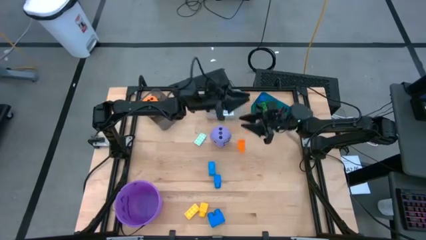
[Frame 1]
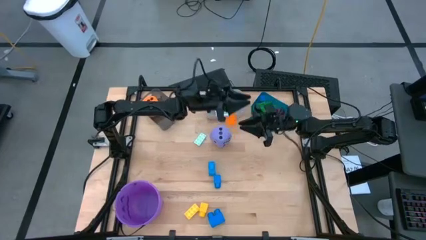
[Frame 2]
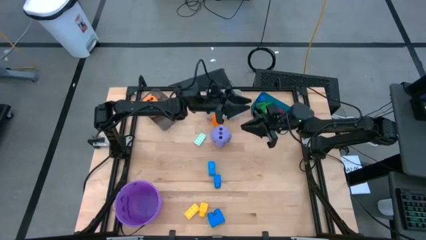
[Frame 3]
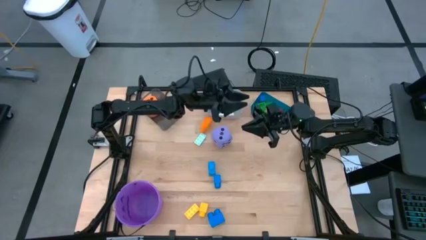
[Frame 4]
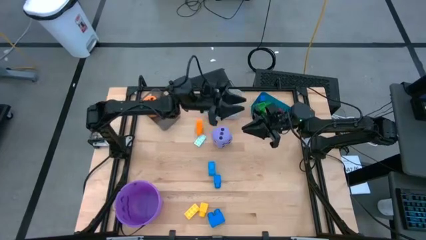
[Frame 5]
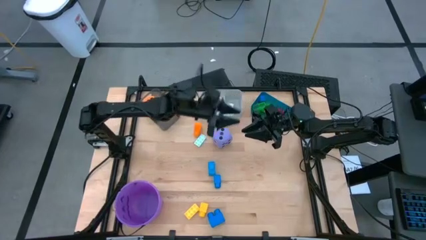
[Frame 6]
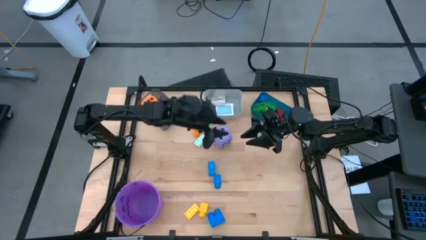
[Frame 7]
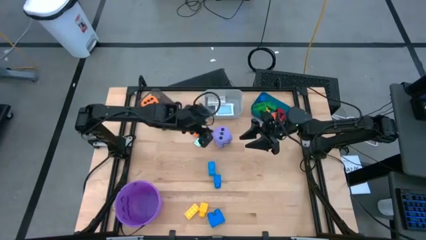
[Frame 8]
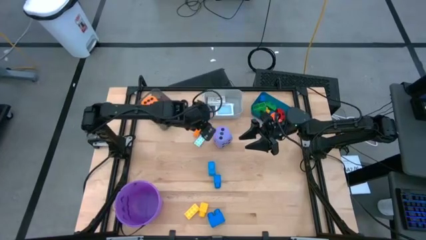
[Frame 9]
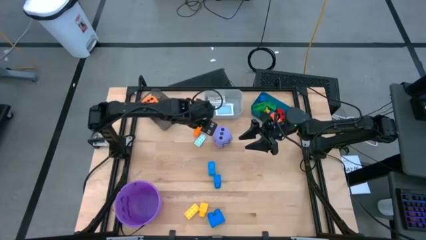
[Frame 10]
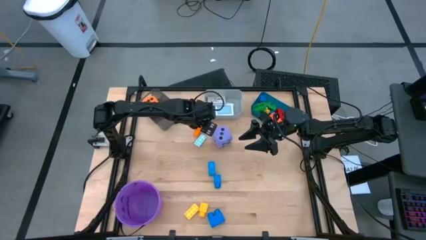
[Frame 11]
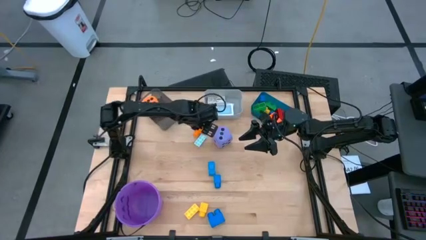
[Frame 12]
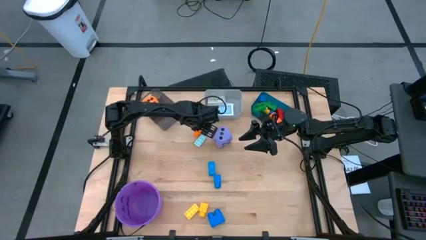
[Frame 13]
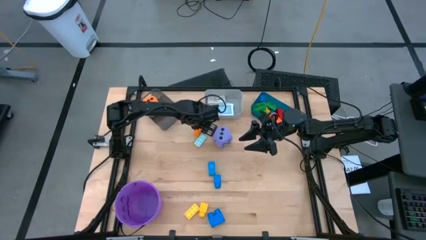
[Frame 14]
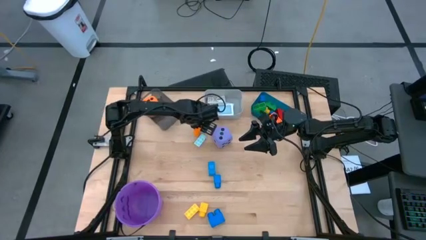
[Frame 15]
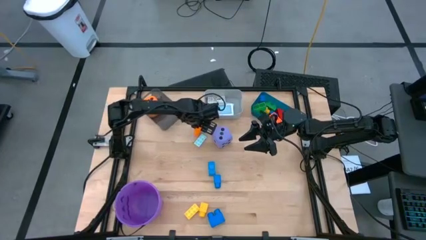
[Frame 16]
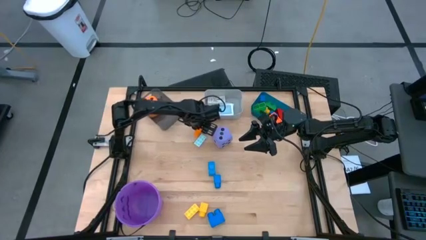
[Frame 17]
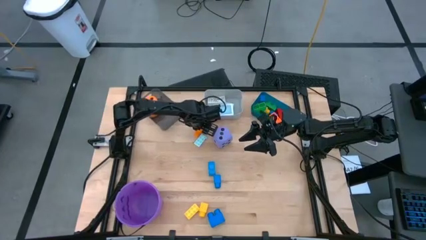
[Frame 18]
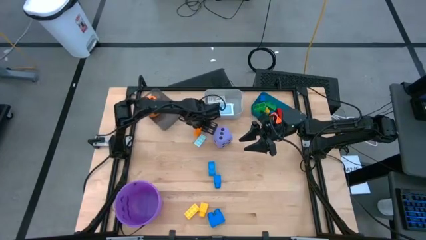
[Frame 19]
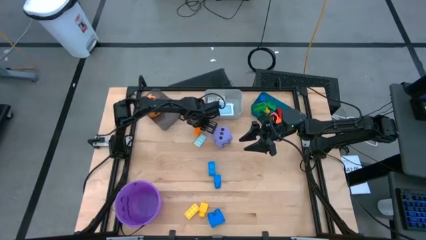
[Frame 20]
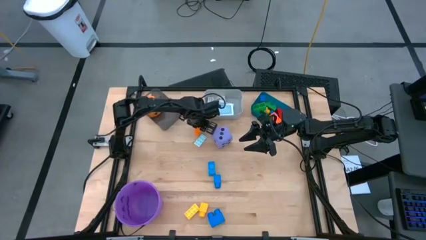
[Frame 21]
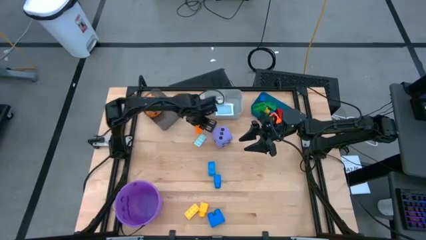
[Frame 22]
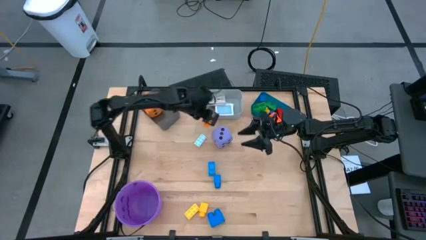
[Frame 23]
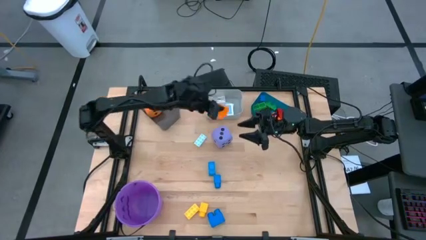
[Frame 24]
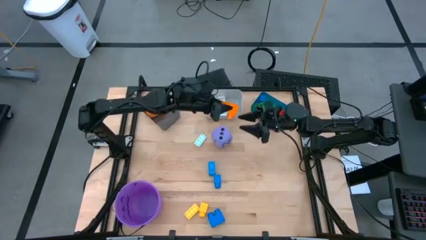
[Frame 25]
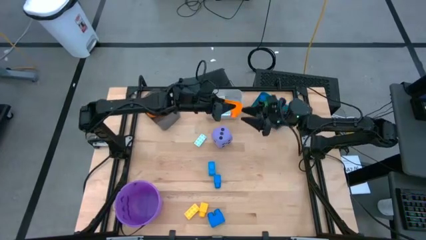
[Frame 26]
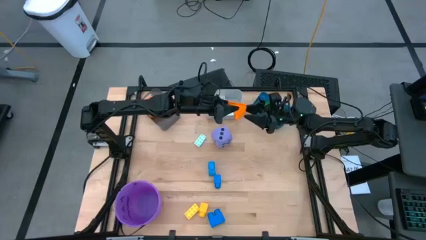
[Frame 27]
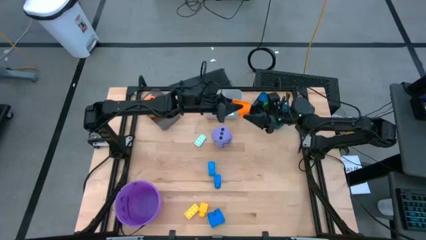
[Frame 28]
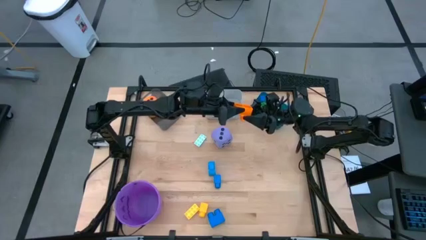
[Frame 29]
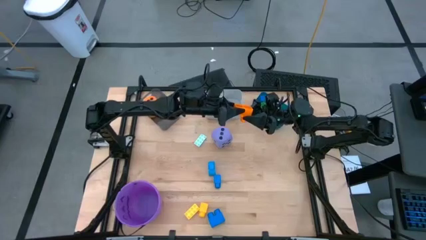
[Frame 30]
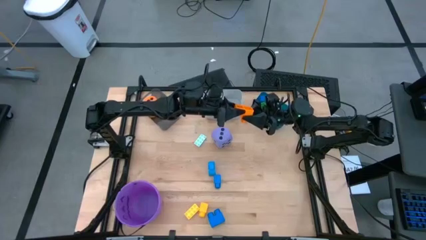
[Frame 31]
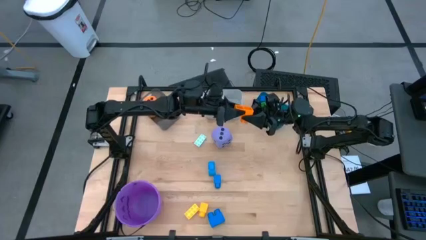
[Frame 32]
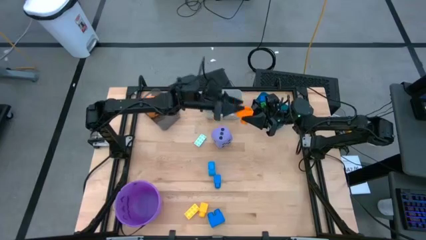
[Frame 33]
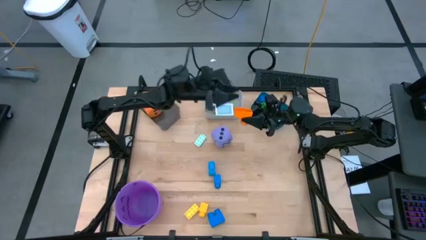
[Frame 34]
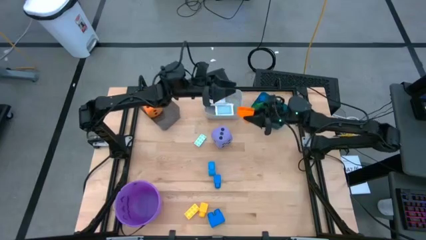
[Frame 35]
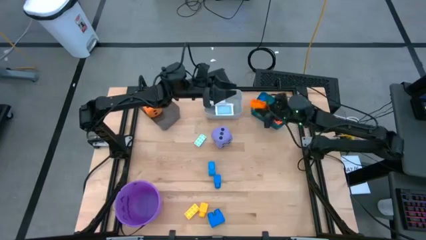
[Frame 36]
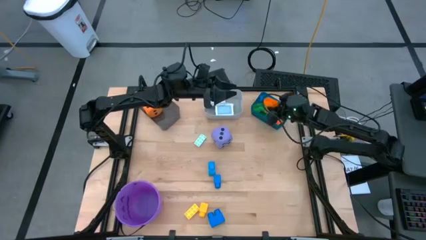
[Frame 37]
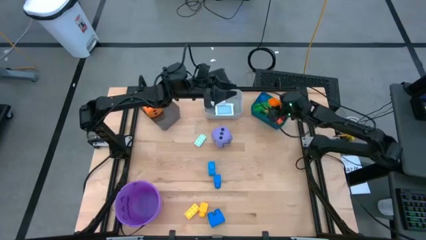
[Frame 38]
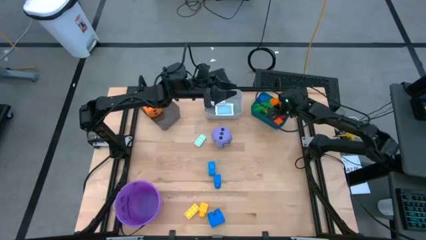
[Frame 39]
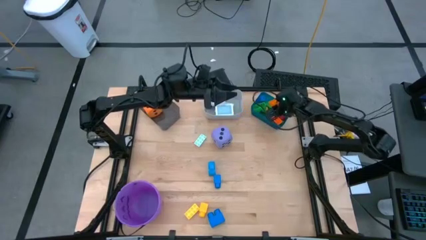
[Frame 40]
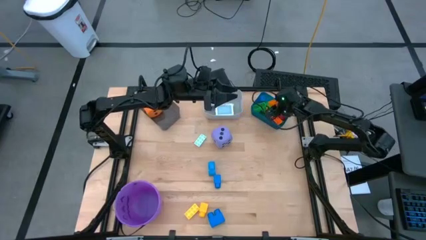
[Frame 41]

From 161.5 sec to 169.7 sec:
Task: Pick & Place Toys
Put the orange game piece into the blue bin

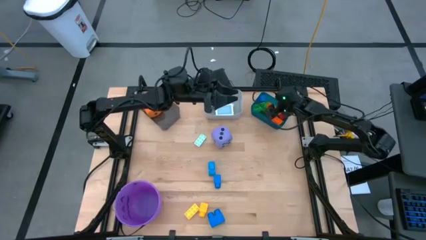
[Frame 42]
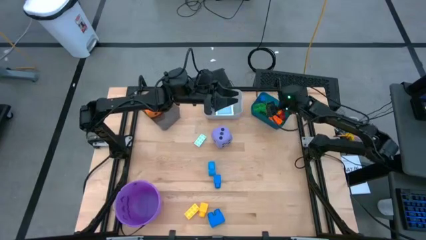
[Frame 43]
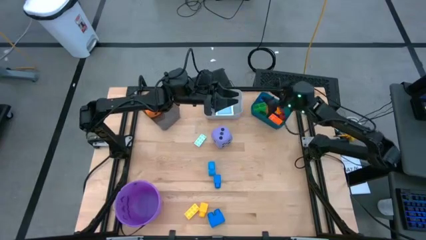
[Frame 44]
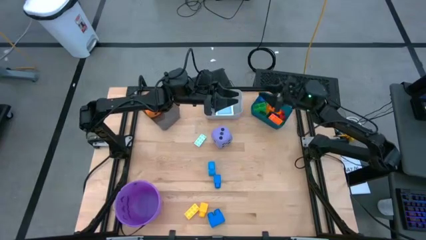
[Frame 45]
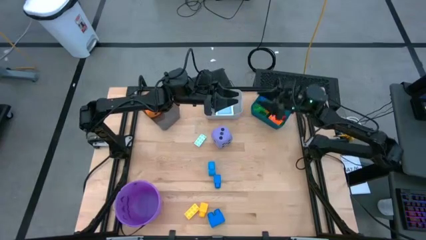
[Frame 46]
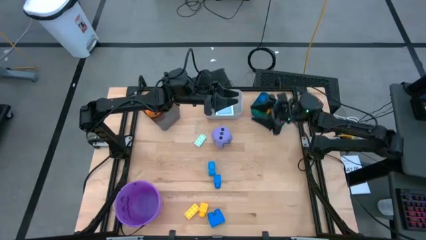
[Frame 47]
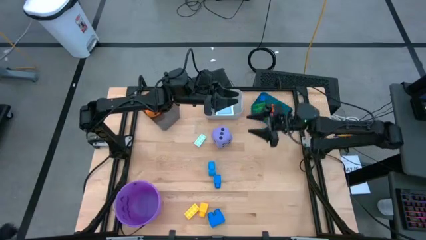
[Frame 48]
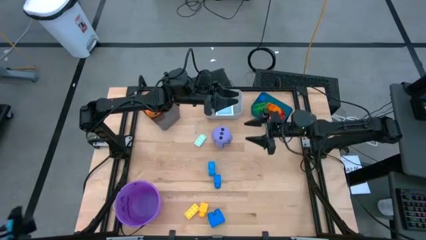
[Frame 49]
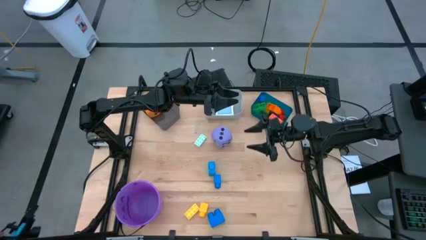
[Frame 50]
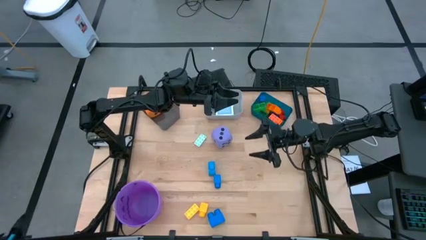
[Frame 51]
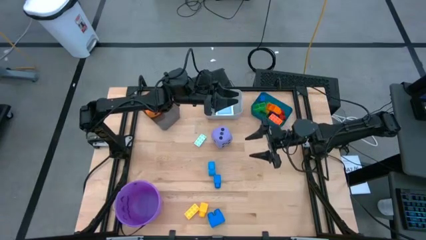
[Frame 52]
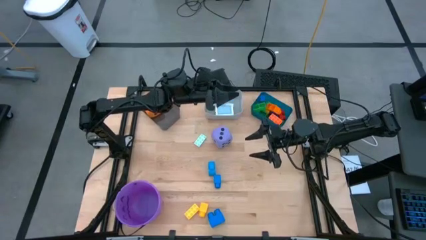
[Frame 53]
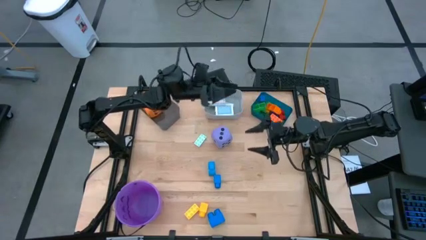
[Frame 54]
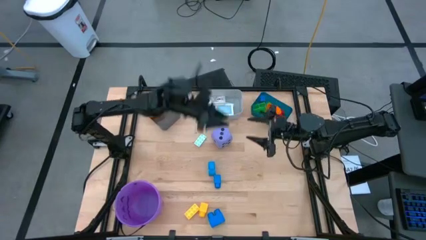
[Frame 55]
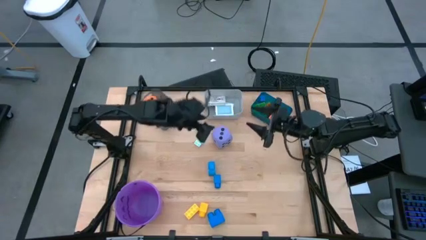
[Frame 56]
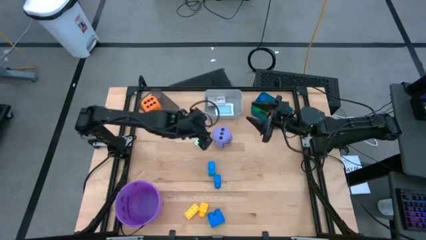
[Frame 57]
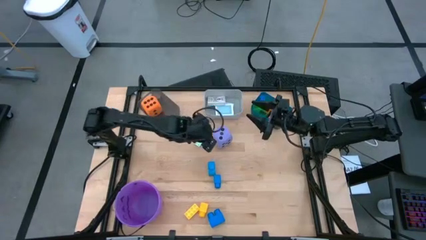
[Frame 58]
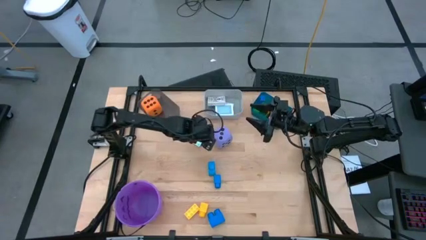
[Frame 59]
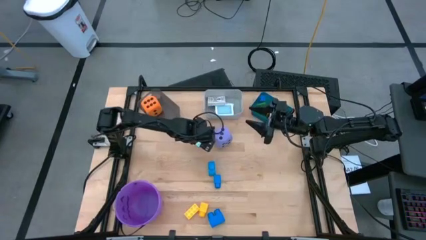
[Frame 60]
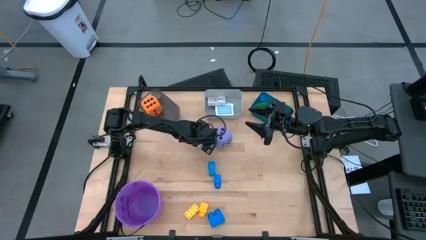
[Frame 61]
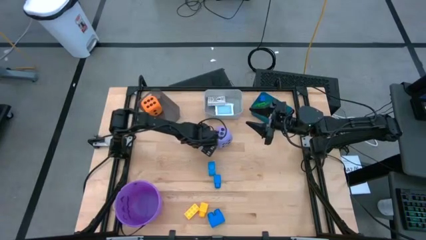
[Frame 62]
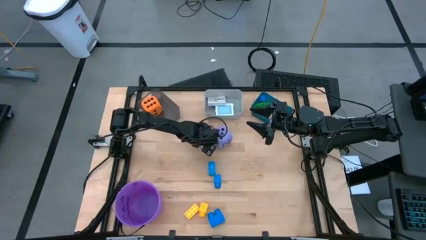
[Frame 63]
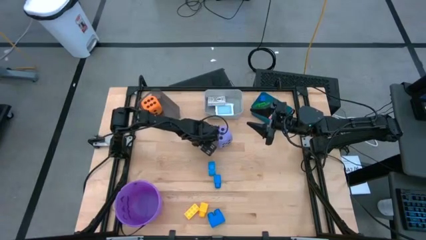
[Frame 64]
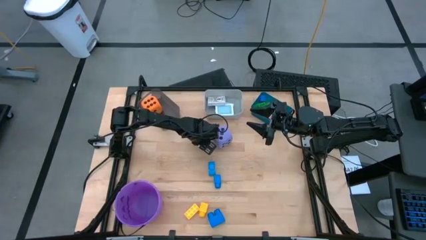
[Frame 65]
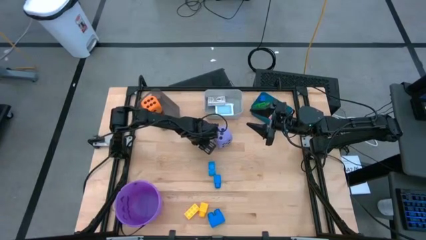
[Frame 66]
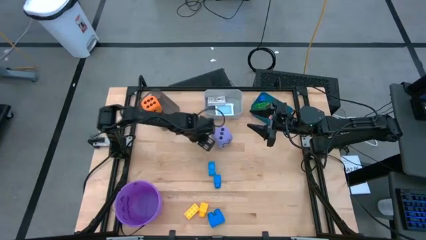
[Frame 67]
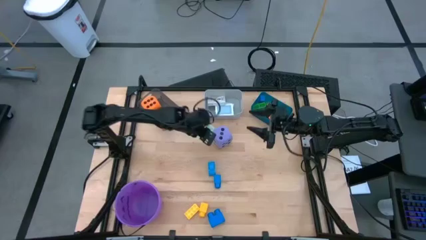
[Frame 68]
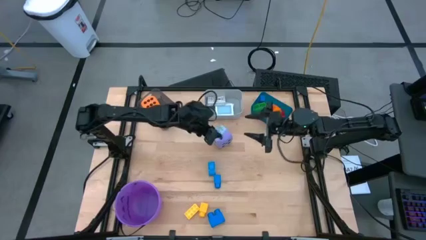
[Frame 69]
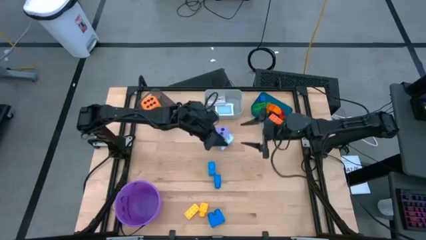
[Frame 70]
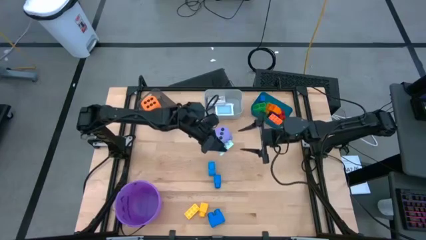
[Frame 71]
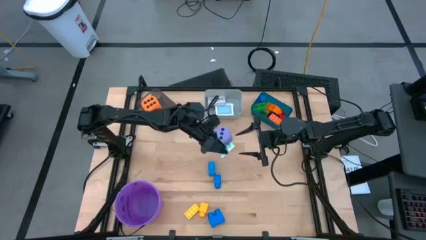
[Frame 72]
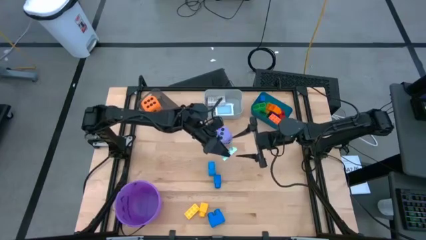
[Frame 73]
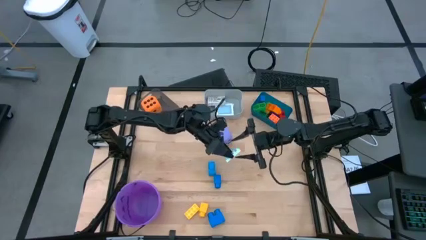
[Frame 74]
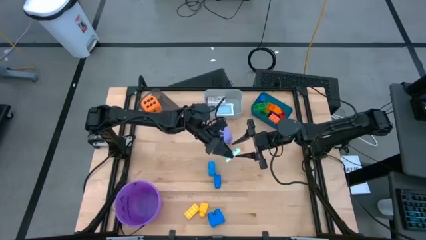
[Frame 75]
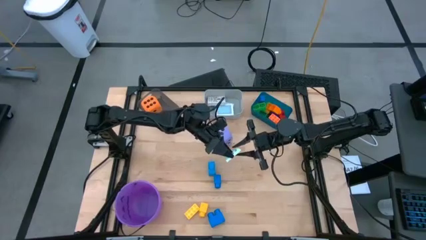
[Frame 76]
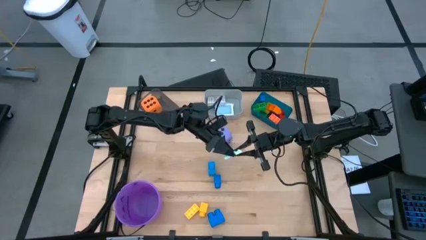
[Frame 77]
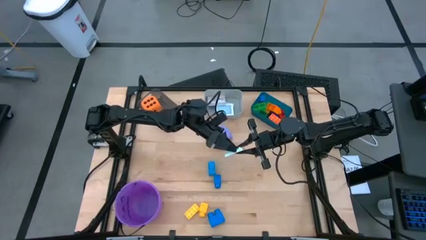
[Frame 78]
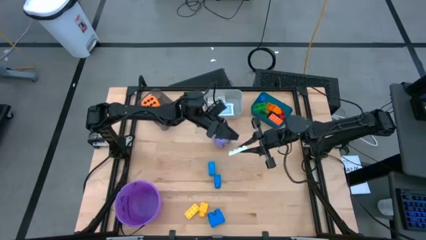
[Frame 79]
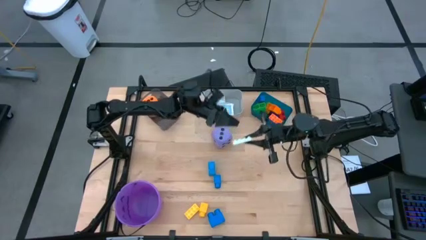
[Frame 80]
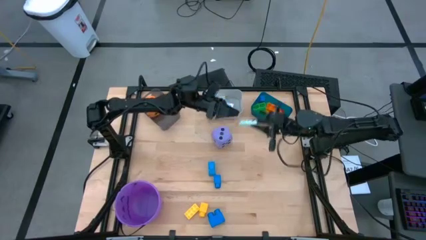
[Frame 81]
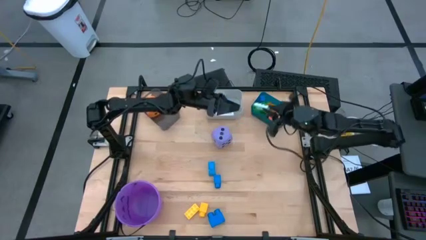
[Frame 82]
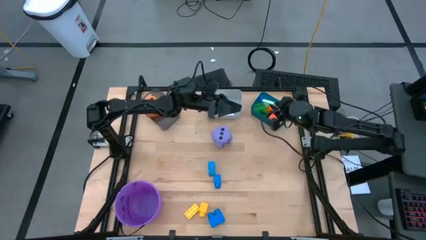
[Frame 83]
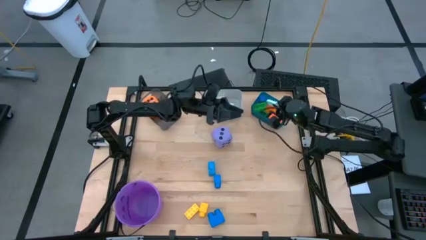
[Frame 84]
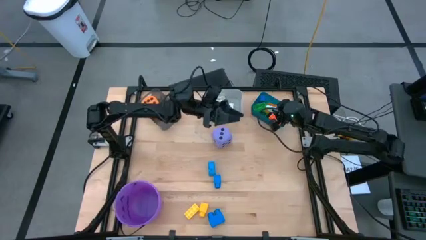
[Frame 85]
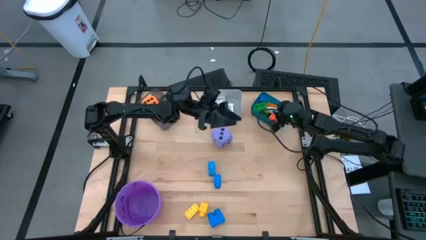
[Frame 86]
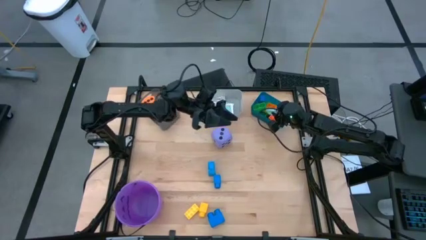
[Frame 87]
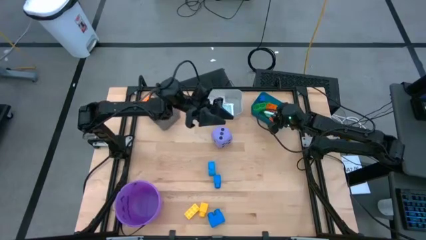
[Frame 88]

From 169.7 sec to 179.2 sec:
Put the light blue game piece into the blue bin
